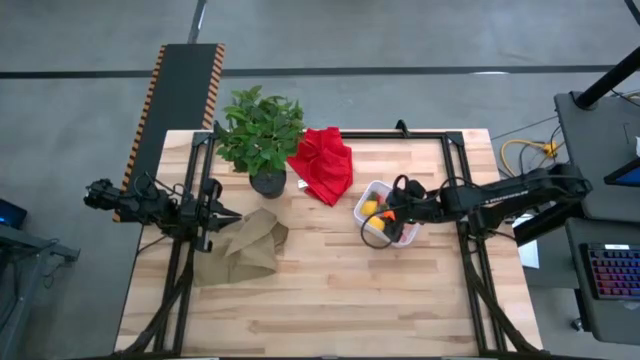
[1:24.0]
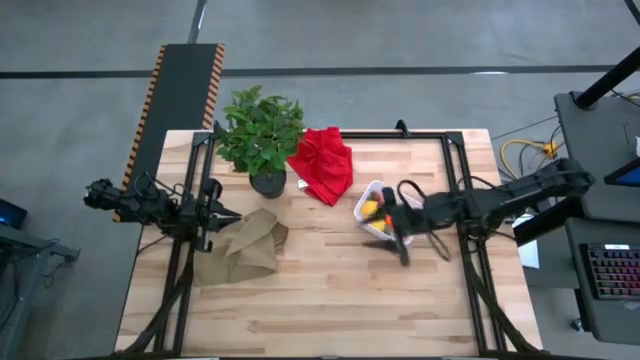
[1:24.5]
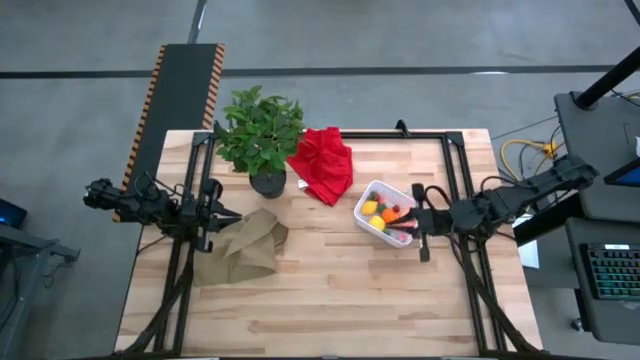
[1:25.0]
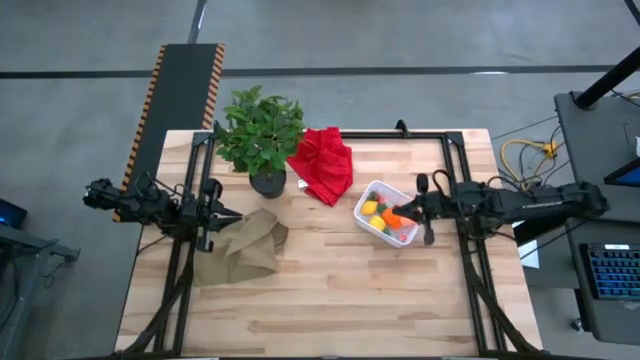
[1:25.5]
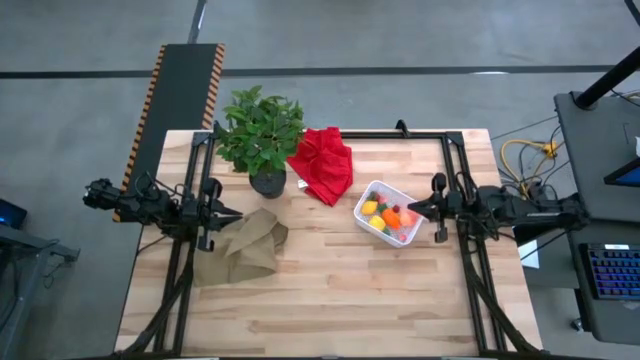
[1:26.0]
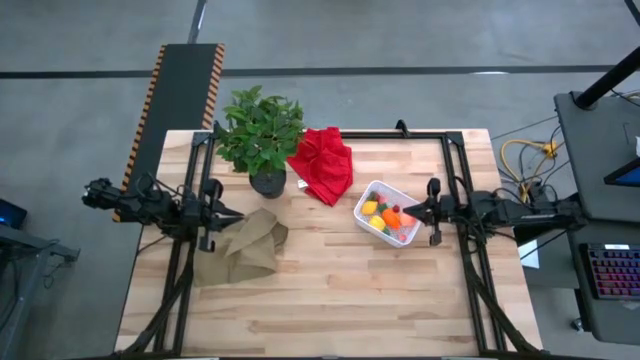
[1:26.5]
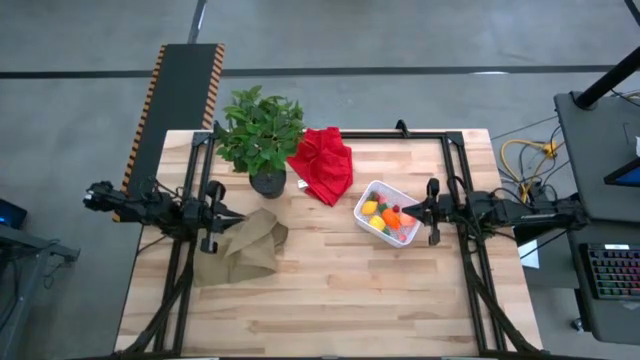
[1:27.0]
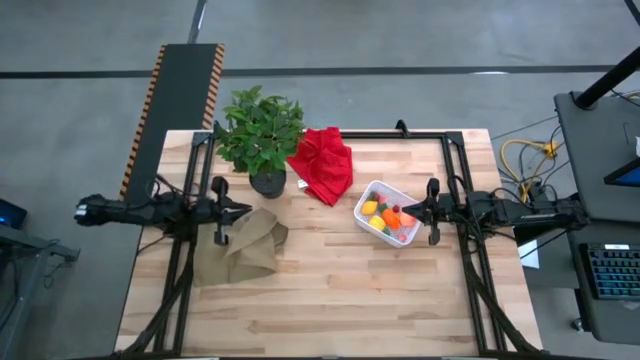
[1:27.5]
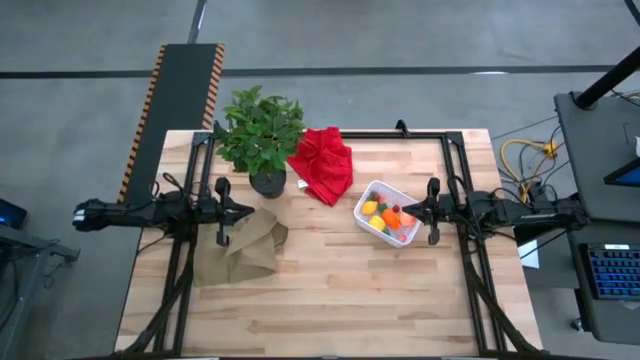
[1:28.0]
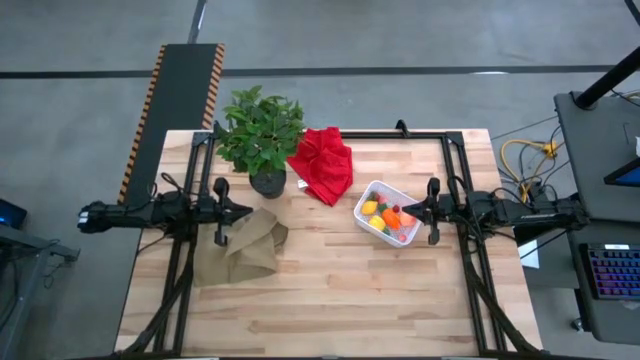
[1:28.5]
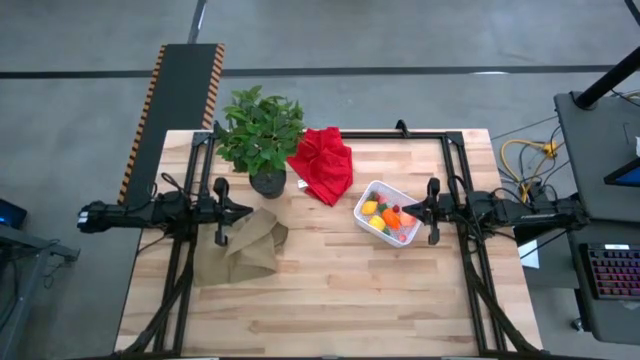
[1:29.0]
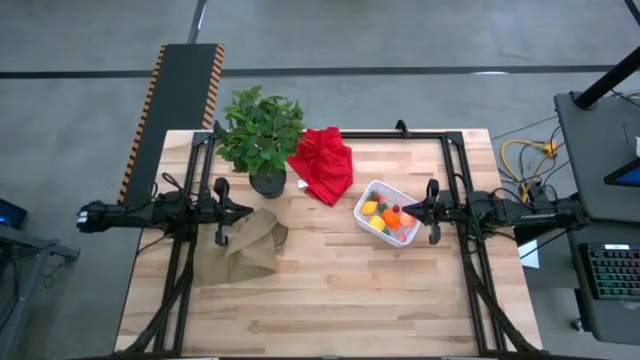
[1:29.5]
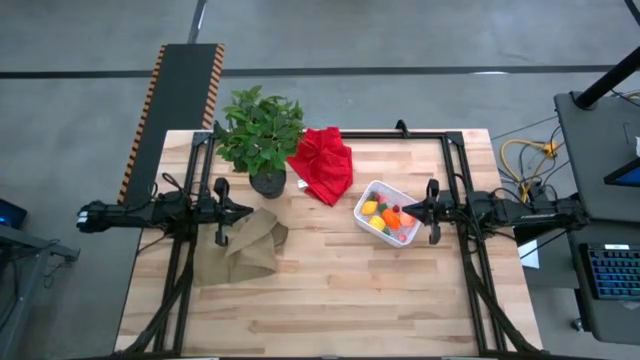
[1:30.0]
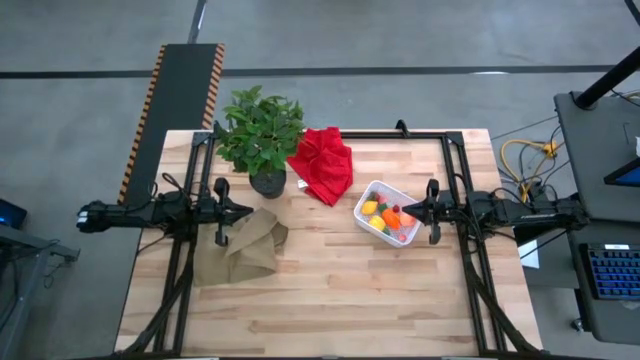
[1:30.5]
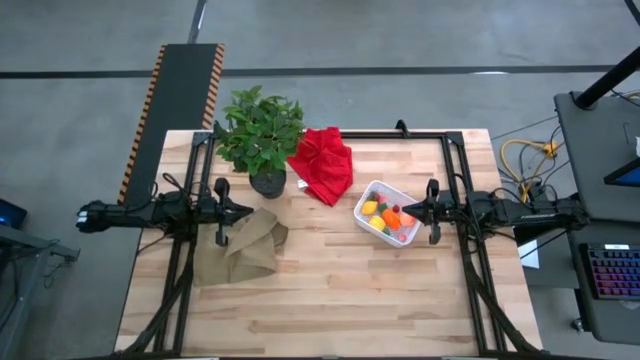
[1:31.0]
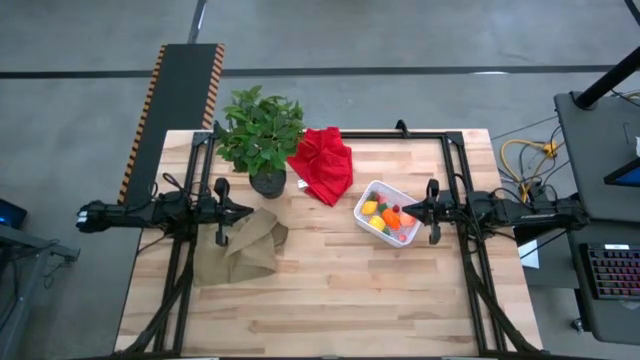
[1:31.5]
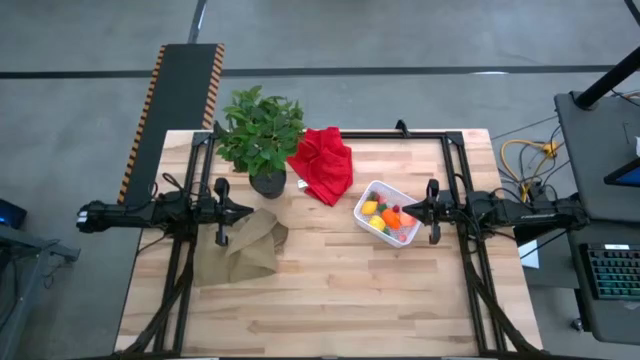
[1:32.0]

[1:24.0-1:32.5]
Task: Pick and placing Produce into tupperware
Return to Home Position

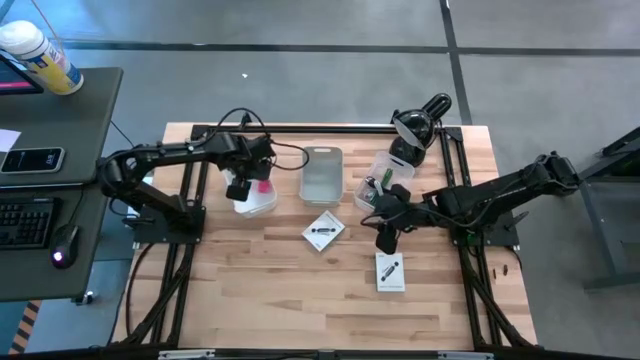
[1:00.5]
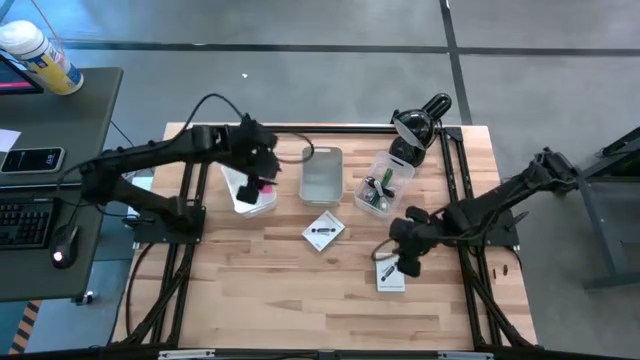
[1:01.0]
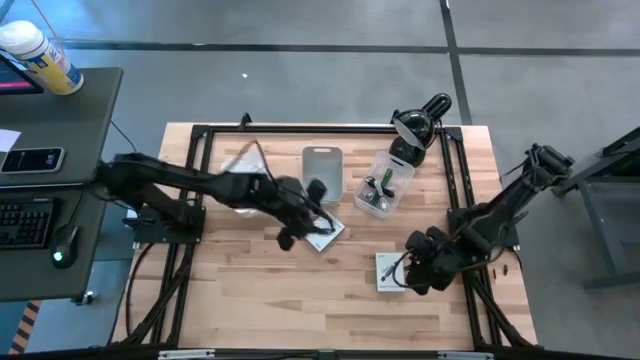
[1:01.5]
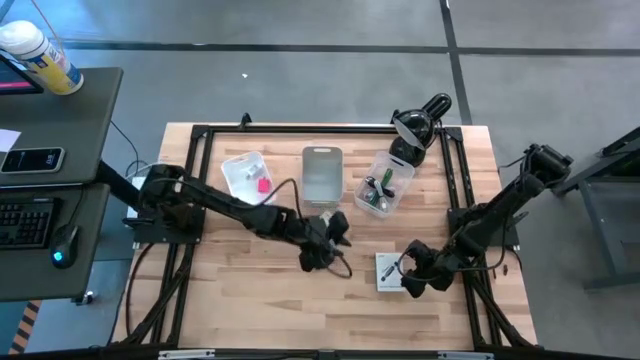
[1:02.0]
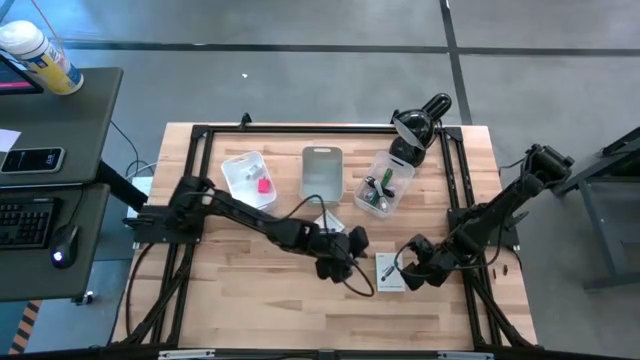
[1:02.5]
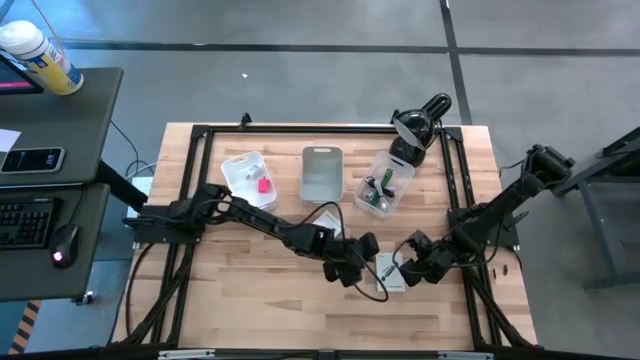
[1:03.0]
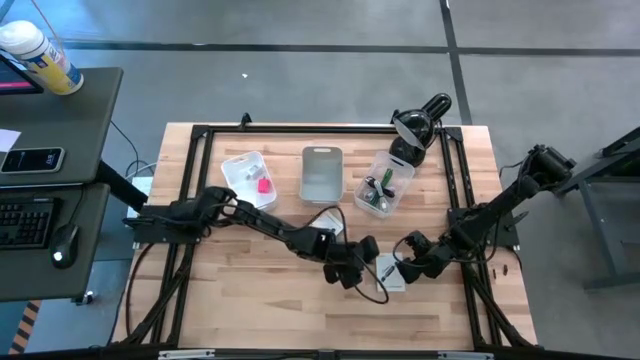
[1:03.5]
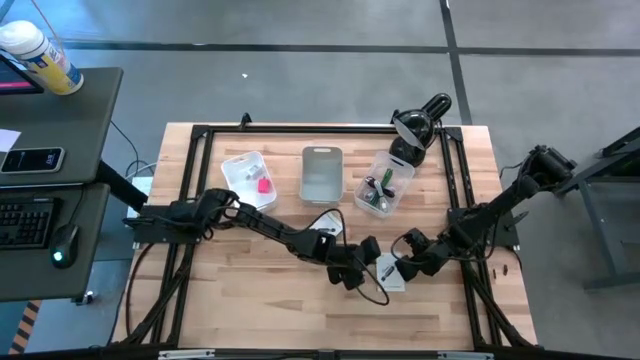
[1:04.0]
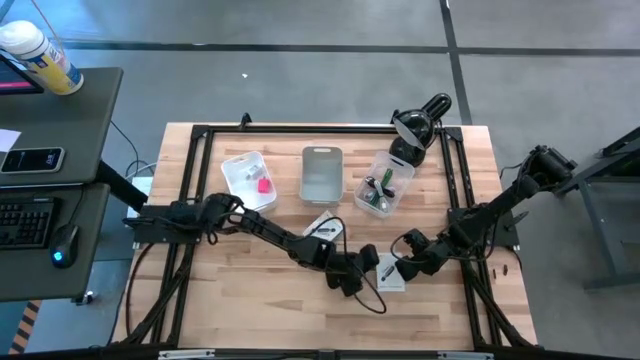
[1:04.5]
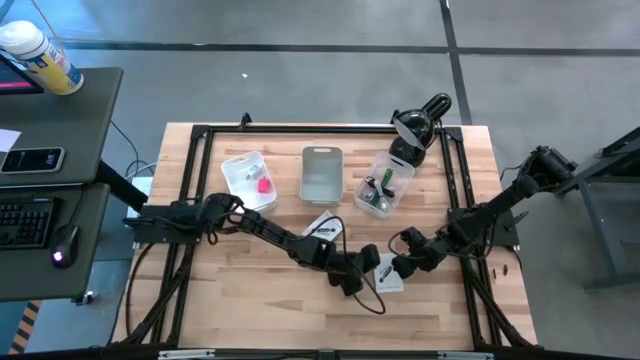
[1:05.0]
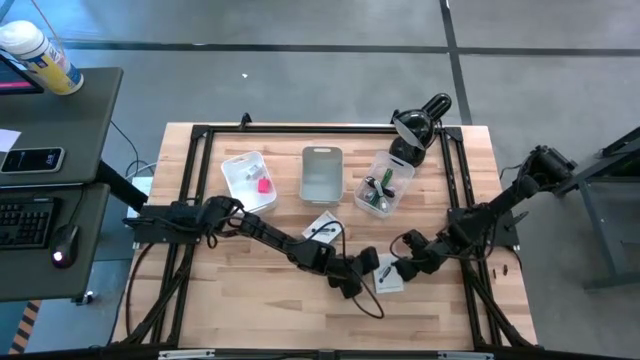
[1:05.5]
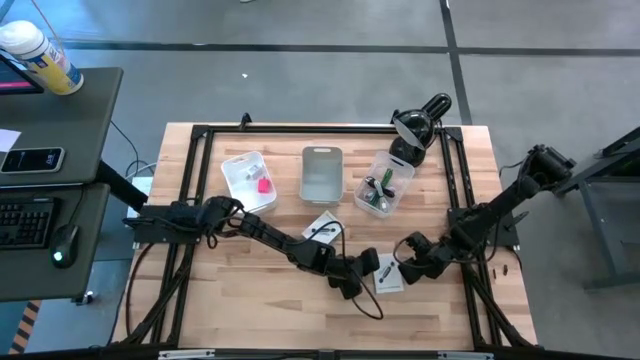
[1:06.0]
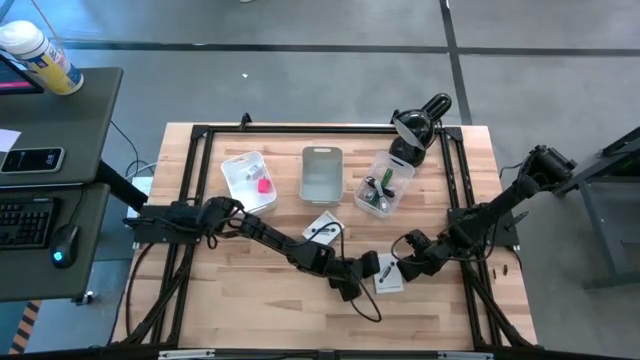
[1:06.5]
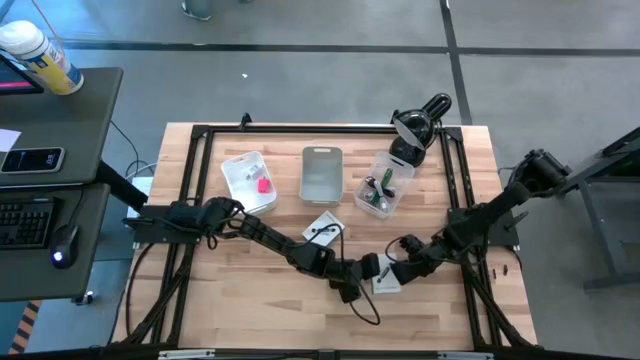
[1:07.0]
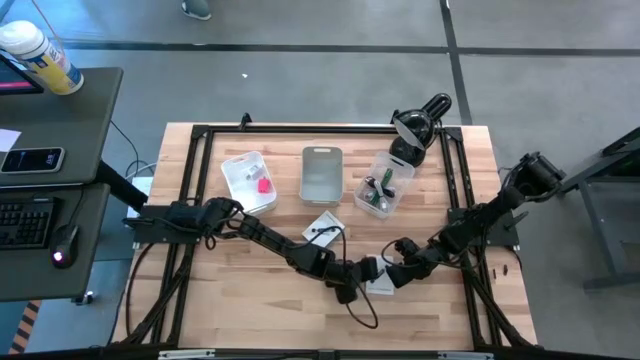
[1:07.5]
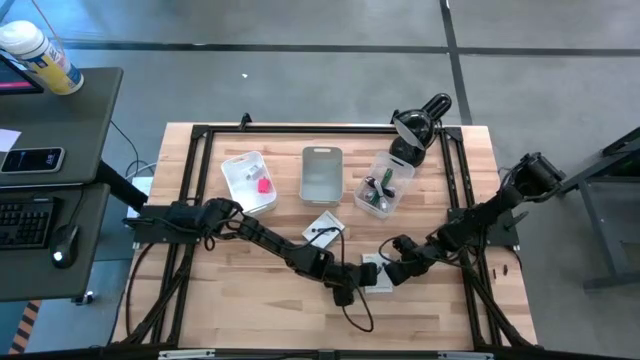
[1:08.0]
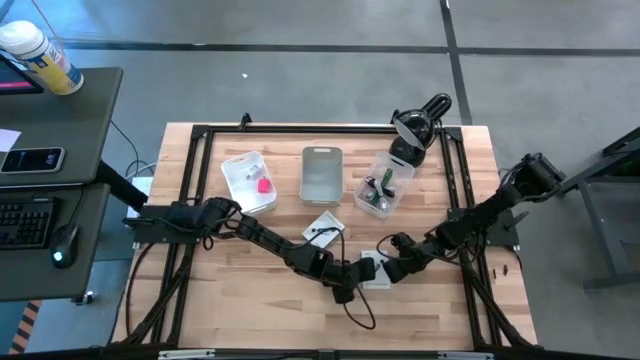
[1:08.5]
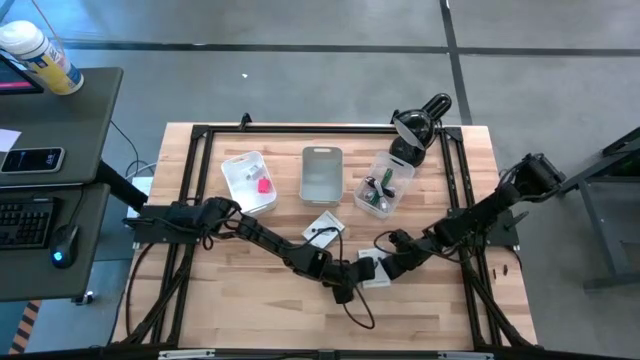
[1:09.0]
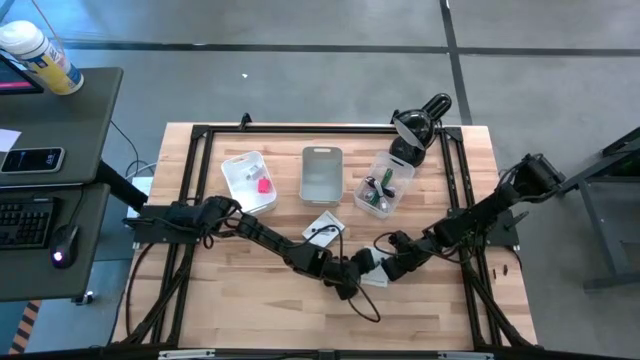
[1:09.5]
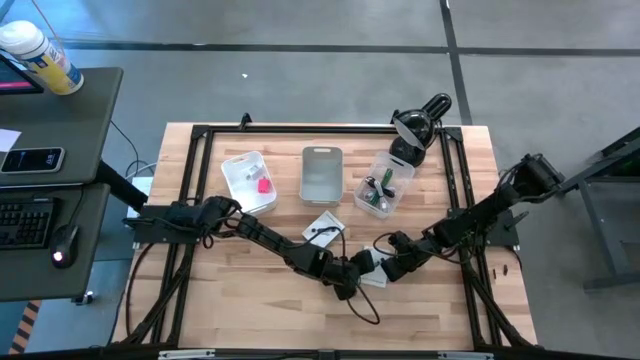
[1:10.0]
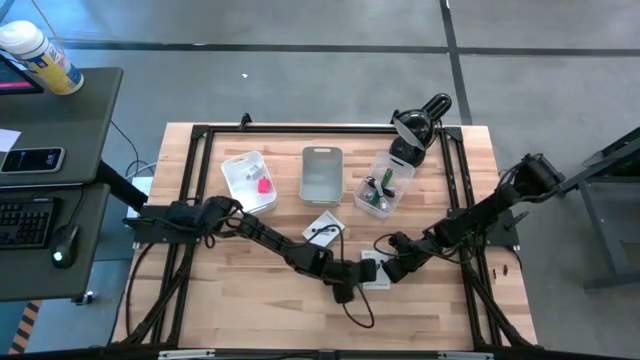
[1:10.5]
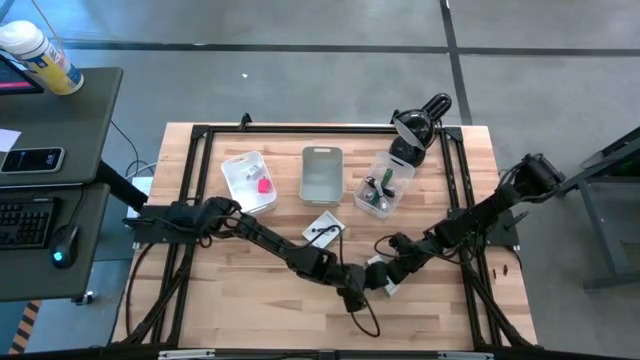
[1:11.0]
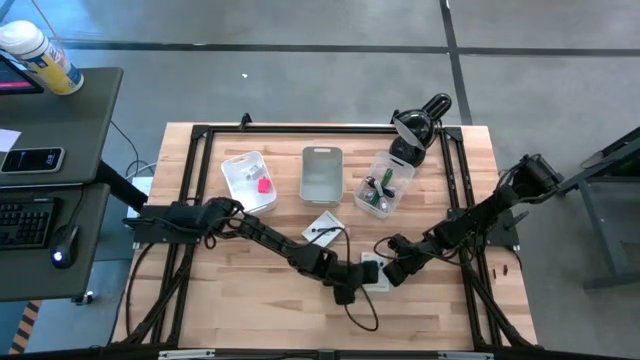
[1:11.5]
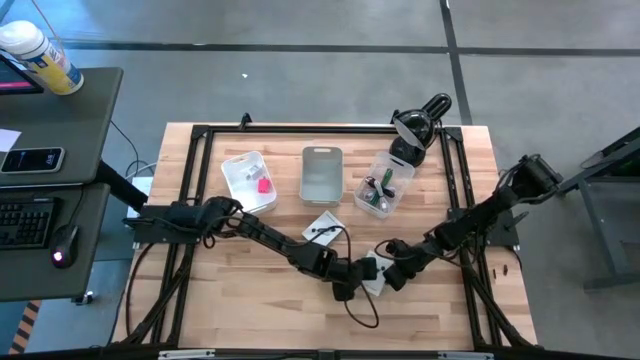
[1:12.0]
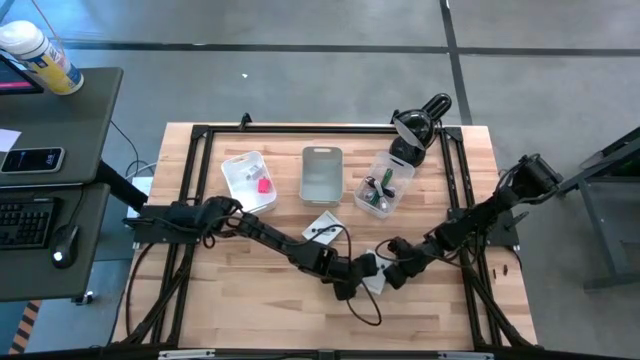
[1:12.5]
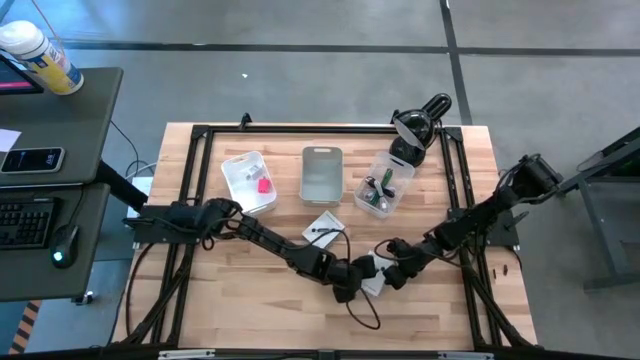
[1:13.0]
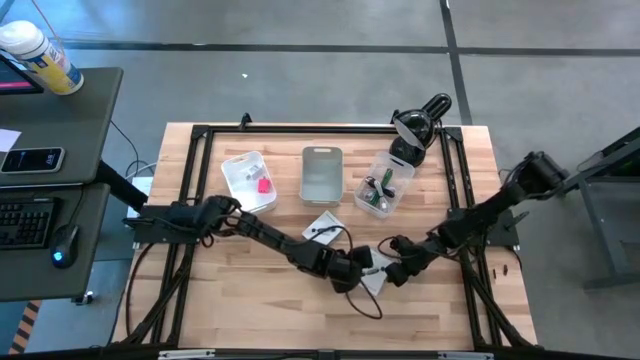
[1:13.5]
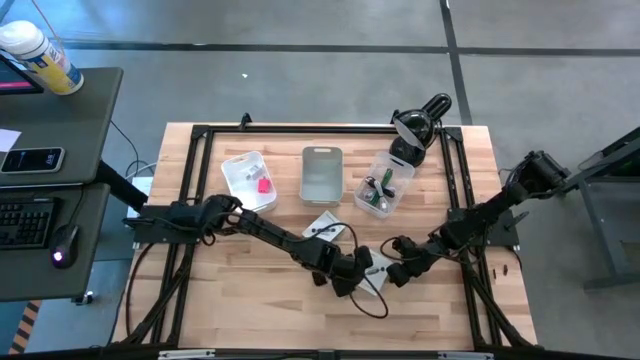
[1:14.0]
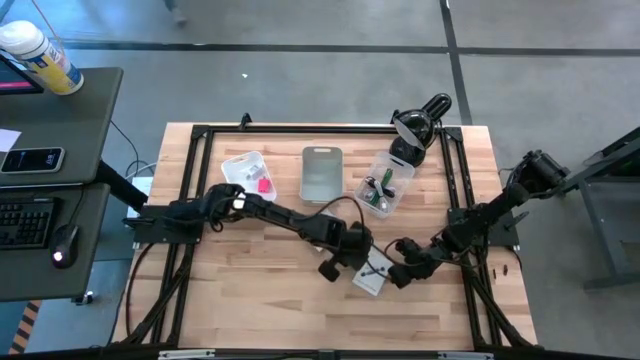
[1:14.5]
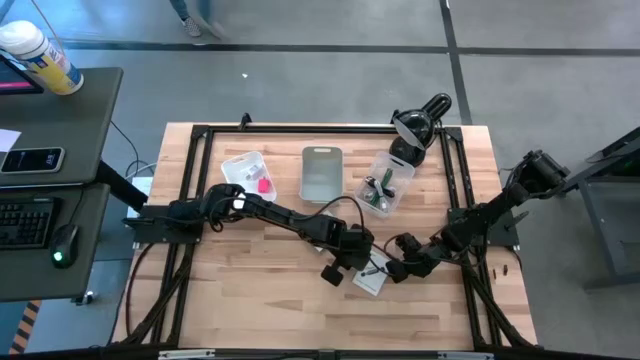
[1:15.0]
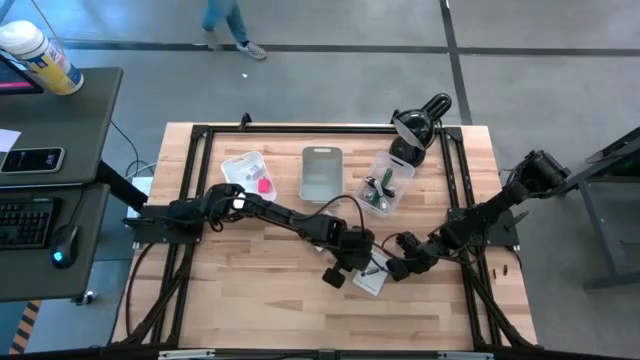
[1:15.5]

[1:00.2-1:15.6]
Task: Pick and place items into bin
Put the bottom white card reader box into the gray bin
